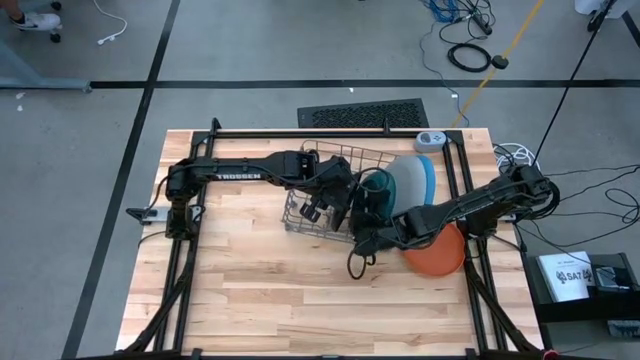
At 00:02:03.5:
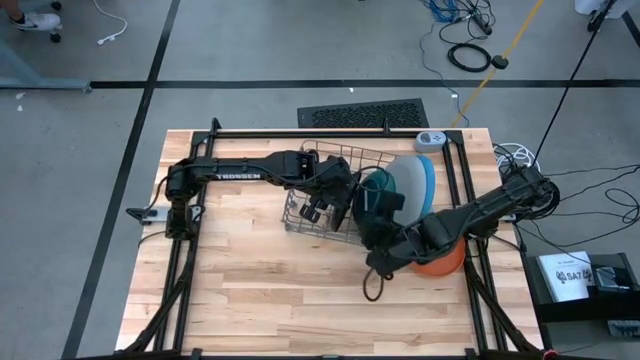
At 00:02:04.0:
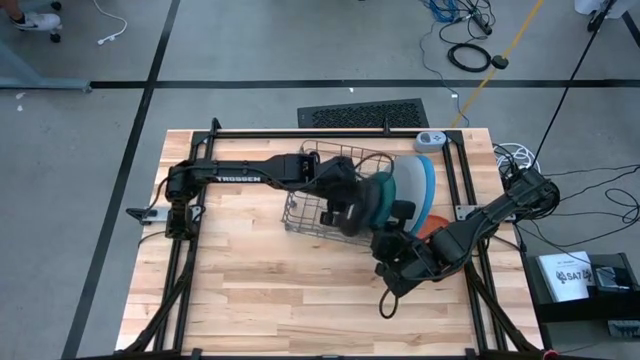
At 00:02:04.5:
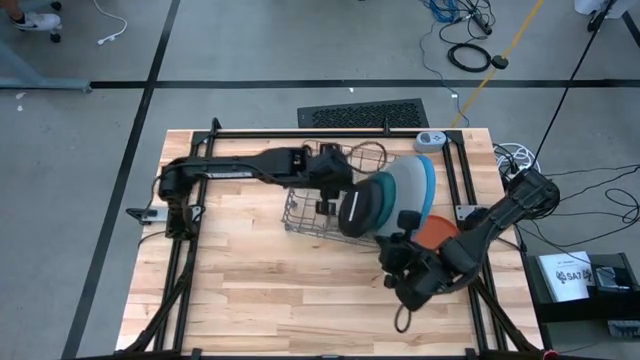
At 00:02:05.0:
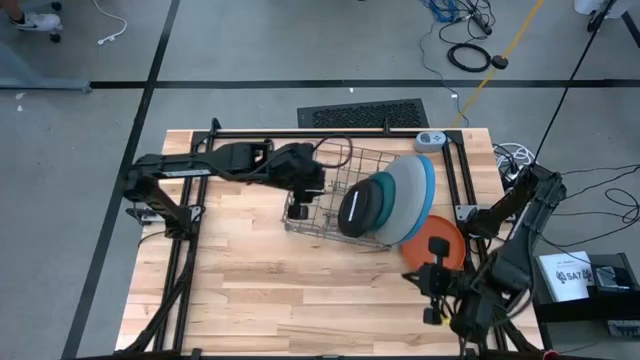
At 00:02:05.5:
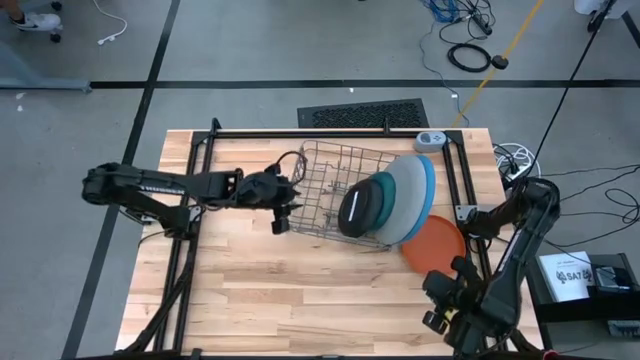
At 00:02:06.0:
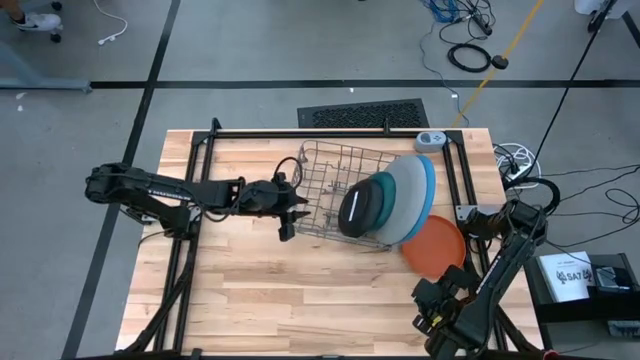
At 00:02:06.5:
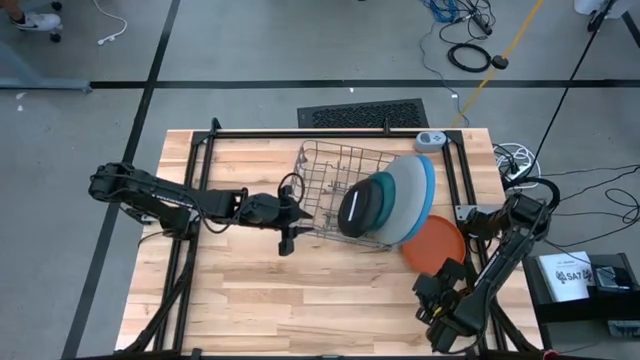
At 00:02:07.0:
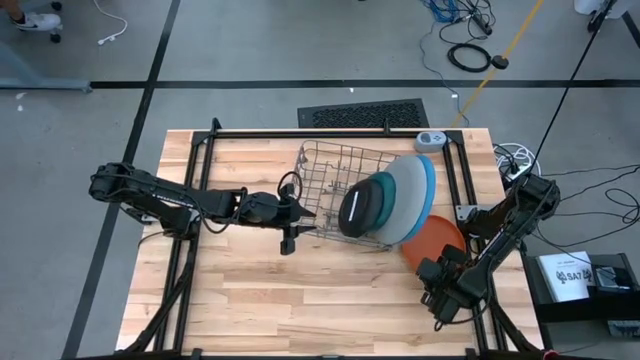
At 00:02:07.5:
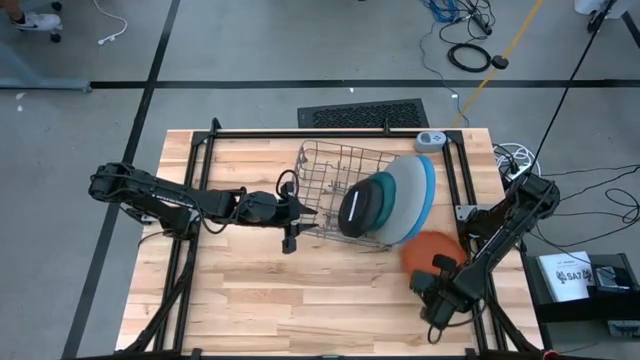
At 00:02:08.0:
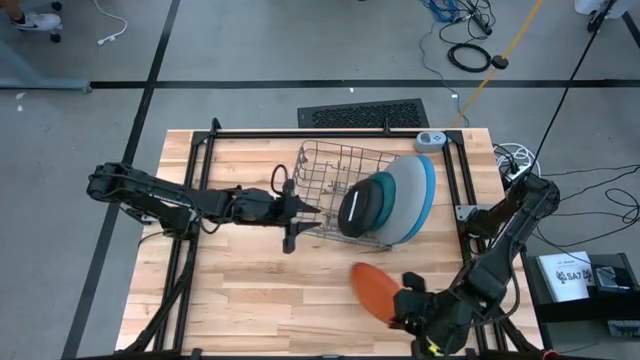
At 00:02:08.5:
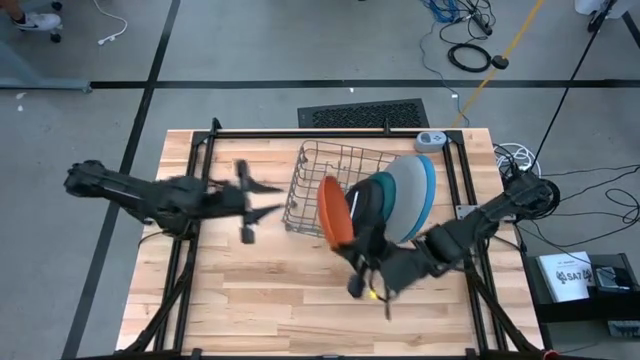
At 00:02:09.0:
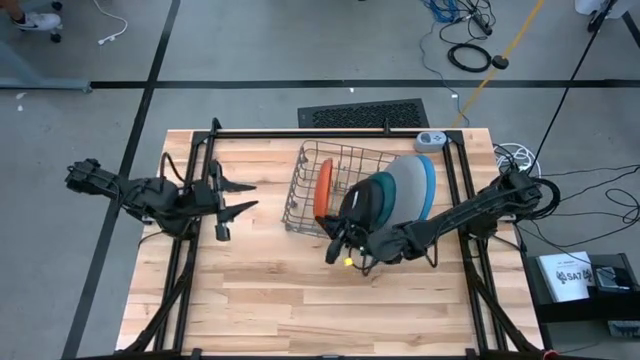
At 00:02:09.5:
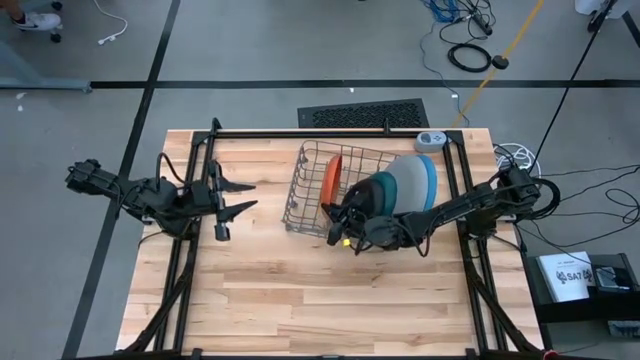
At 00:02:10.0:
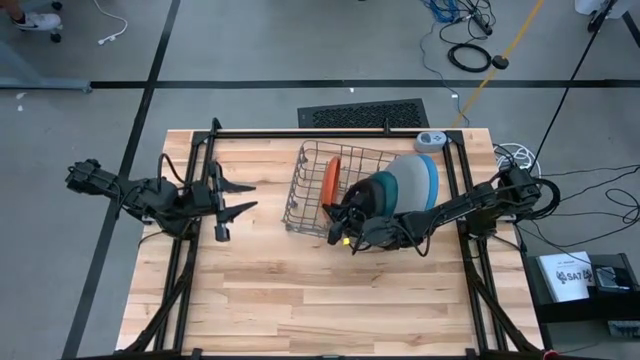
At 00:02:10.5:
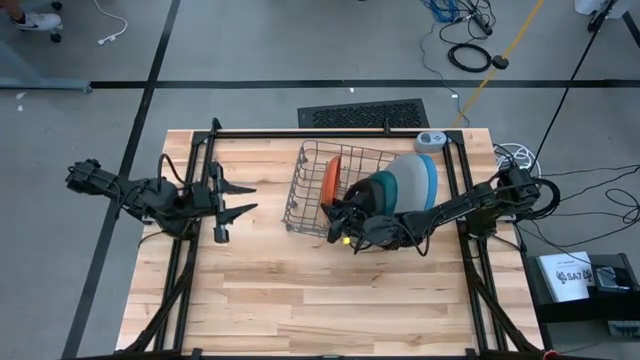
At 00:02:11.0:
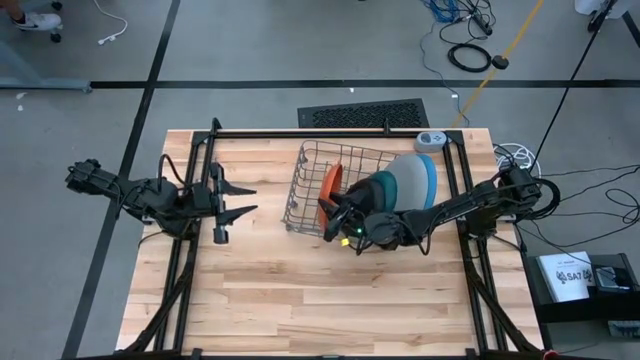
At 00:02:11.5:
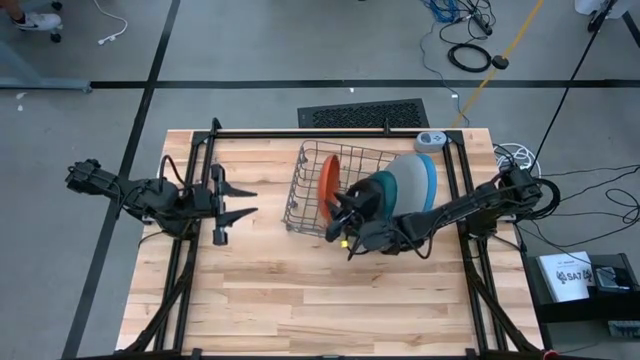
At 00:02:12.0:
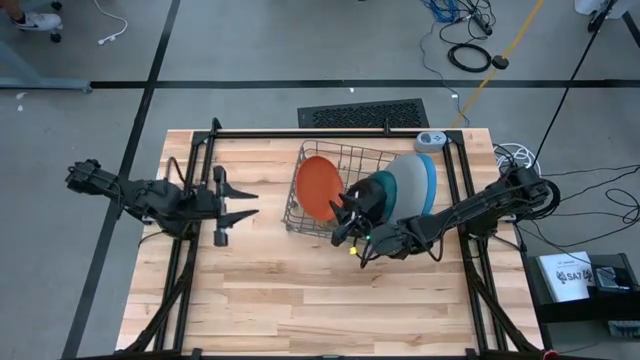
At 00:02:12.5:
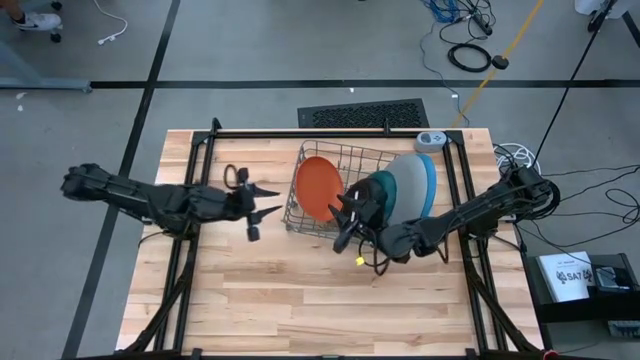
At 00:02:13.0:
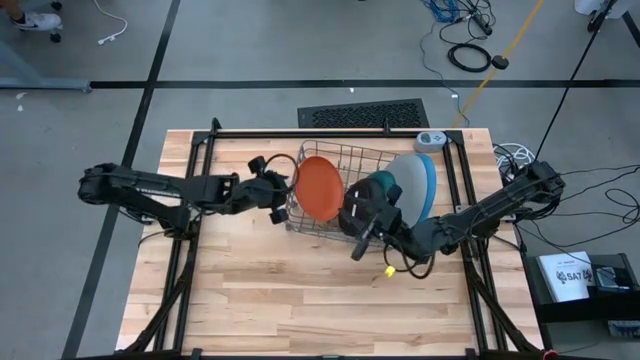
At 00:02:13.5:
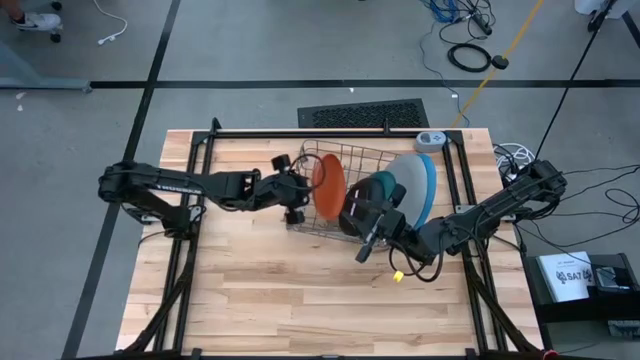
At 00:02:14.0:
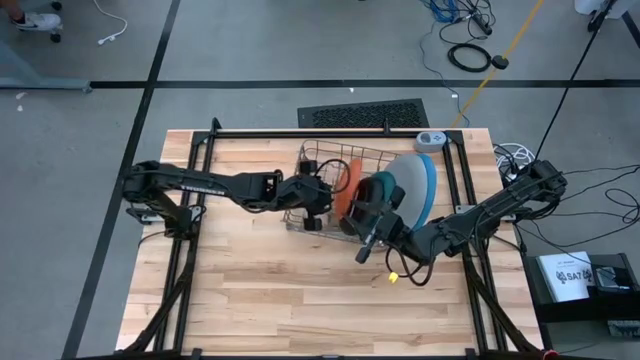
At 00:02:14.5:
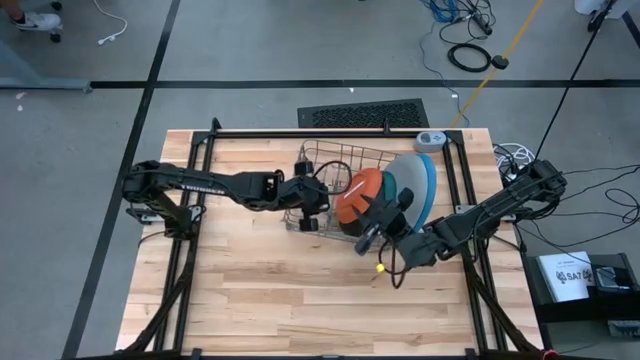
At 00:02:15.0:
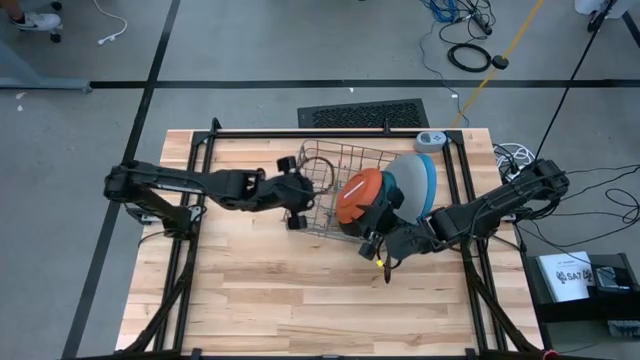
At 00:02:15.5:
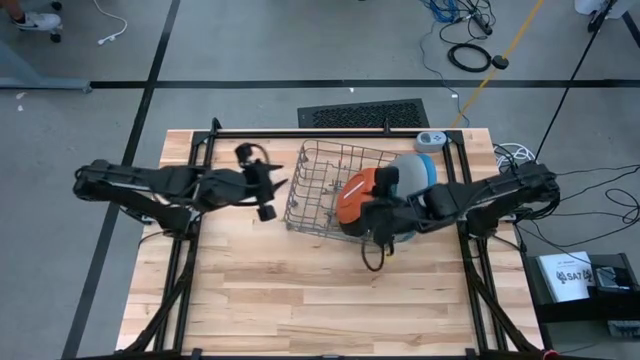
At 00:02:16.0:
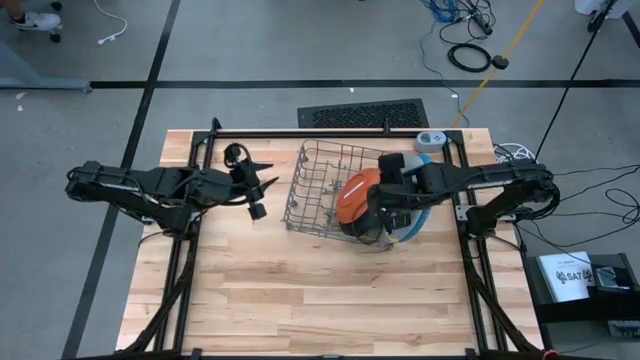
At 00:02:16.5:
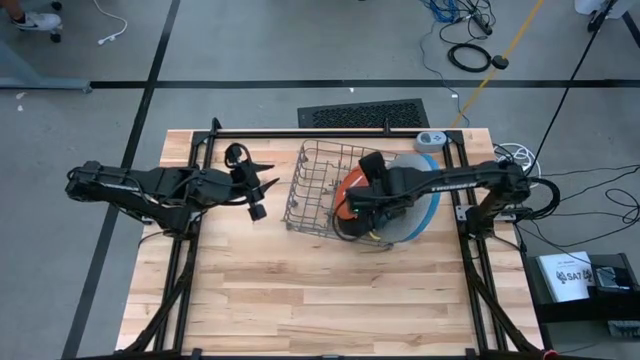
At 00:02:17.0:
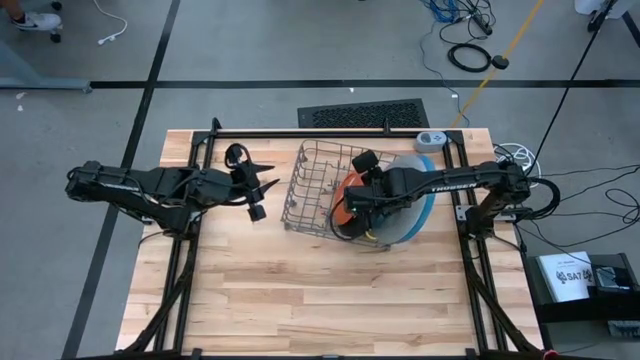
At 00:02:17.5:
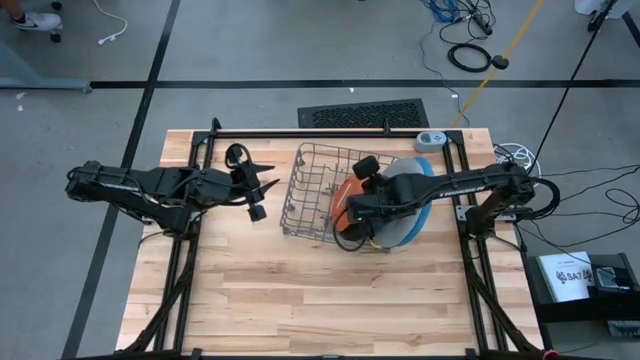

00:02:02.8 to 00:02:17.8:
Task: Sort dishes
Put the orange plate into the dish rack

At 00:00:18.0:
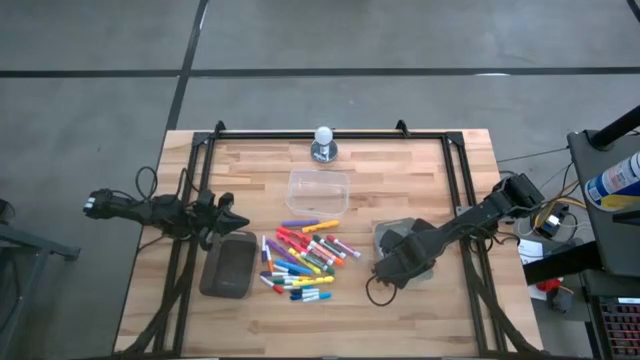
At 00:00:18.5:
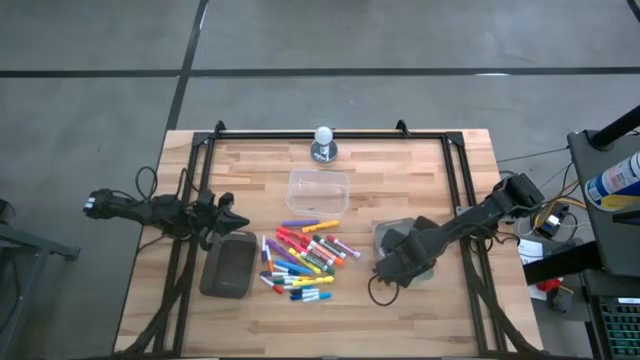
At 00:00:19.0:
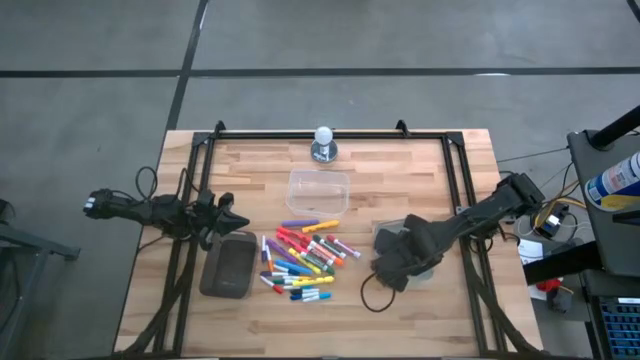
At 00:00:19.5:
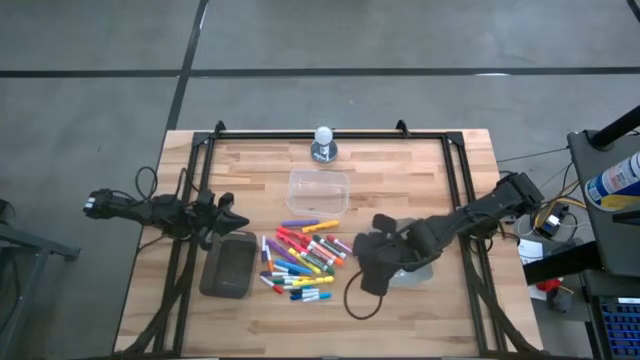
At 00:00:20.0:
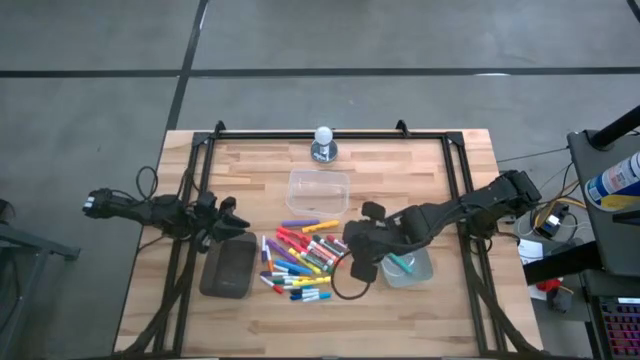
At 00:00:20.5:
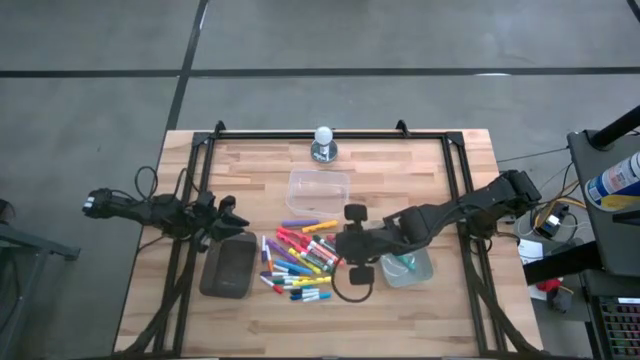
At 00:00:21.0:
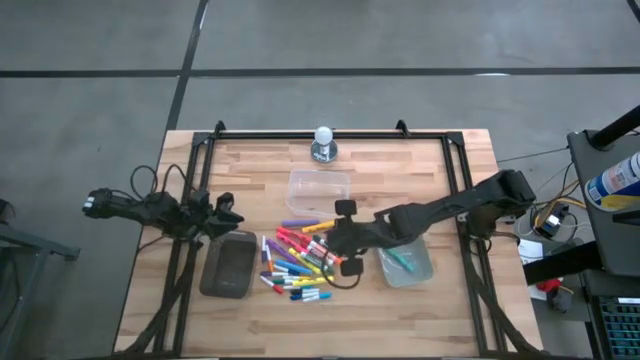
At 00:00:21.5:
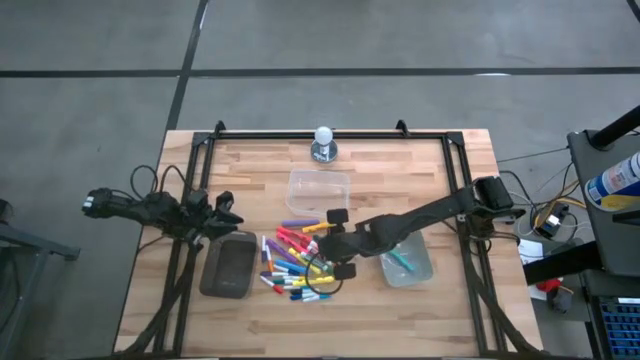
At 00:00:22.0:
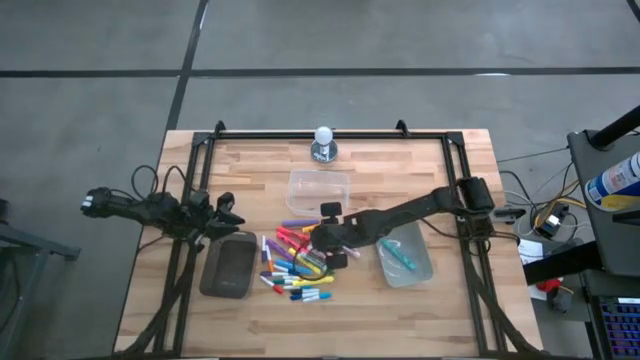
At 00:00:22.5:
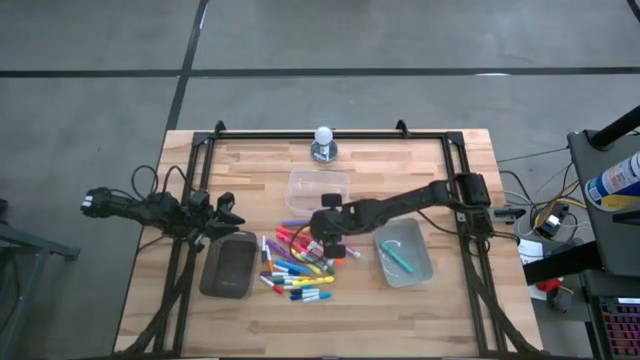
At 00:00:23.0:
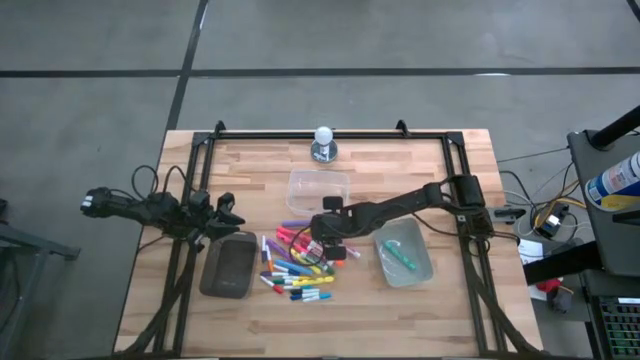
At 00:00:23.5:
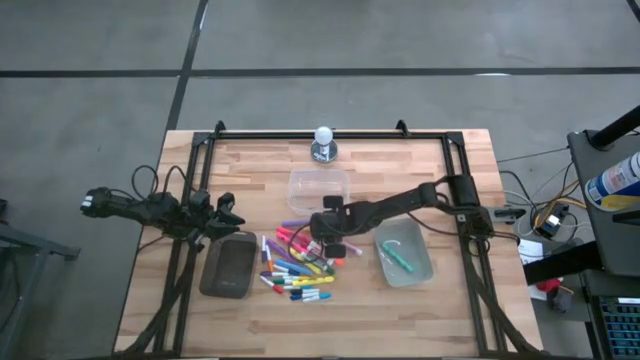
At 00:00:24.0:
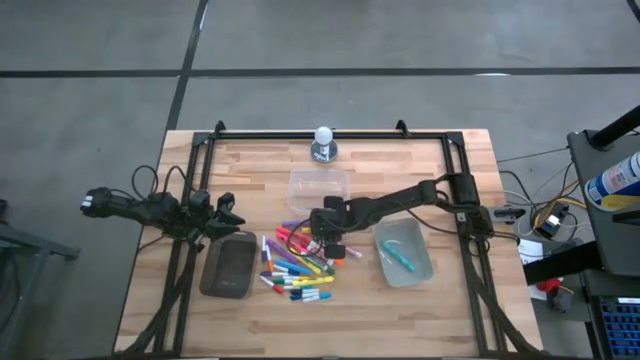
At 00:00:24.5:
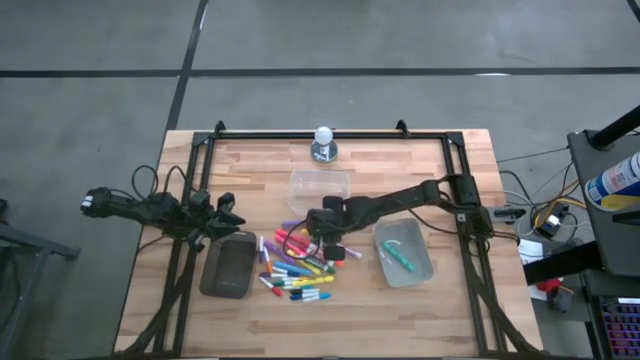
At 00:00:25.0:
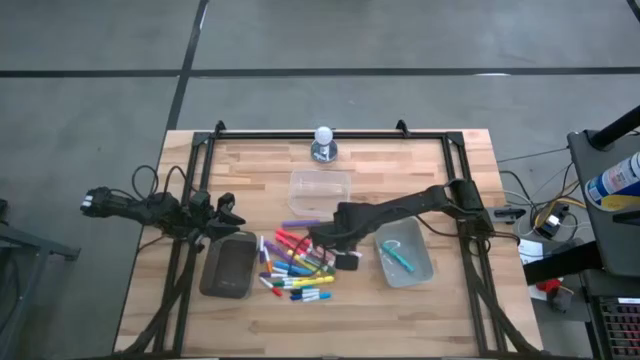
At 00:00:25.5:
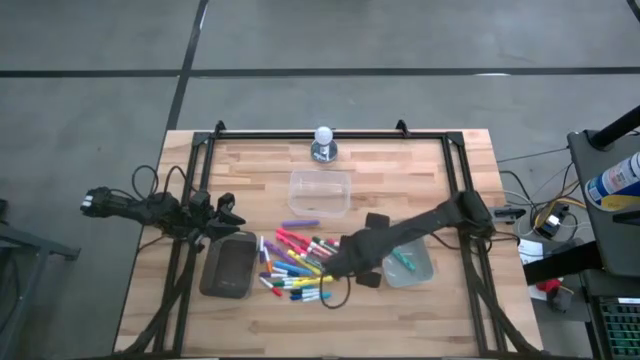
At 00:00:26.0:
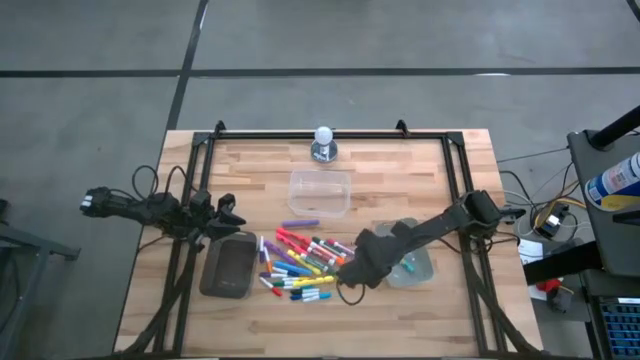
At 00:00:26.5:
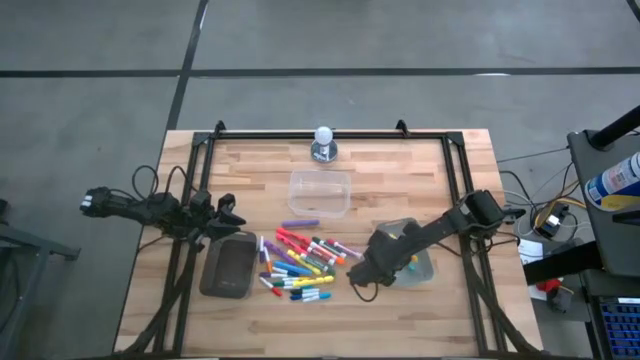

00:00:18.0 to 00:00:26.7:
Task: Pick & Place Markers
Put the yellow highlighter into the gray bin
